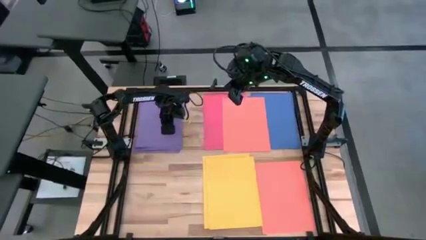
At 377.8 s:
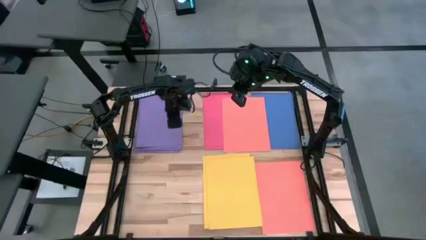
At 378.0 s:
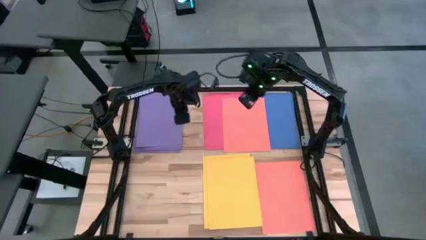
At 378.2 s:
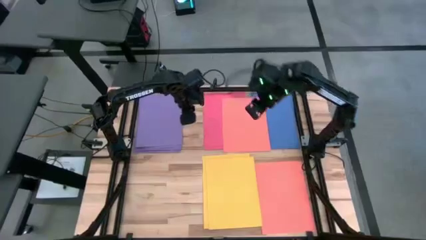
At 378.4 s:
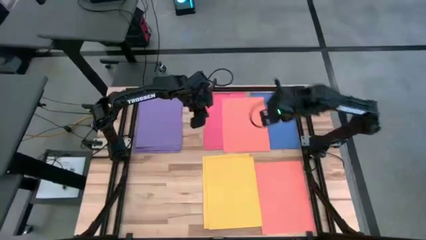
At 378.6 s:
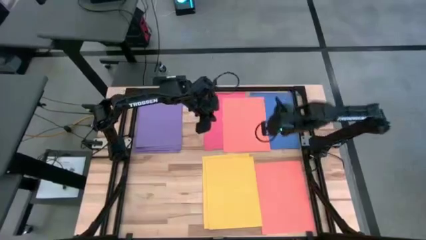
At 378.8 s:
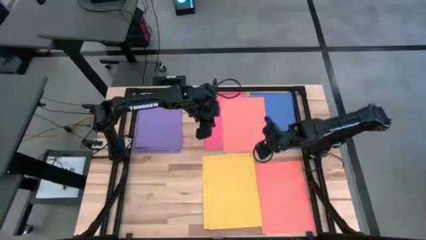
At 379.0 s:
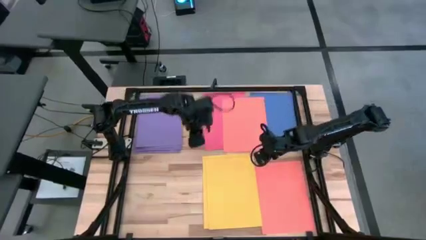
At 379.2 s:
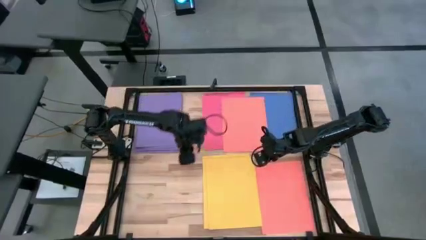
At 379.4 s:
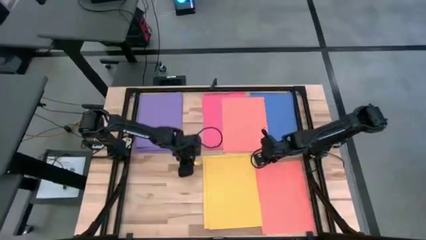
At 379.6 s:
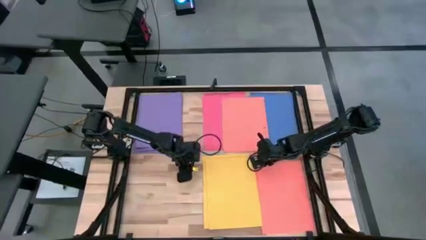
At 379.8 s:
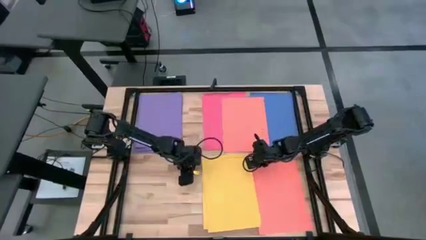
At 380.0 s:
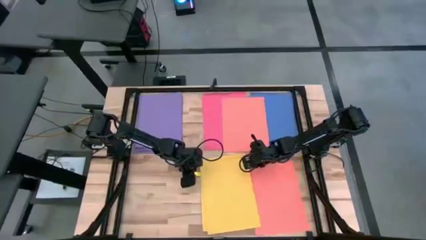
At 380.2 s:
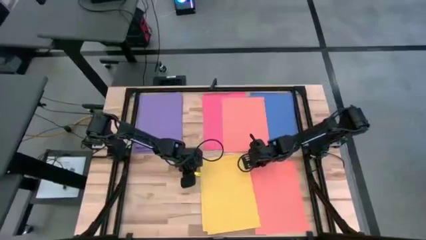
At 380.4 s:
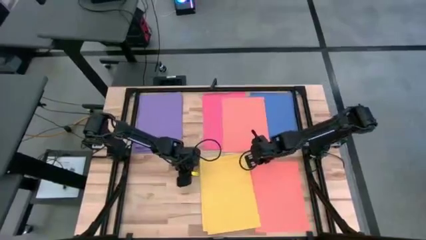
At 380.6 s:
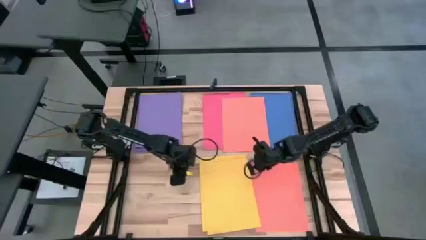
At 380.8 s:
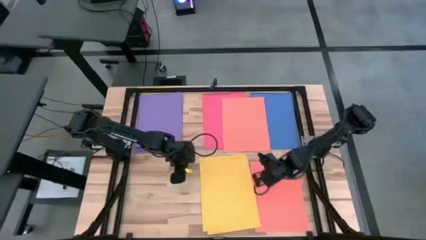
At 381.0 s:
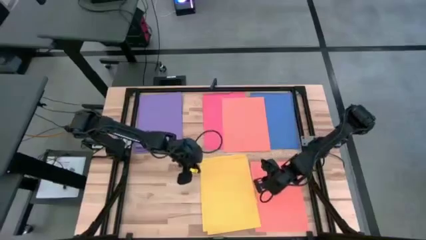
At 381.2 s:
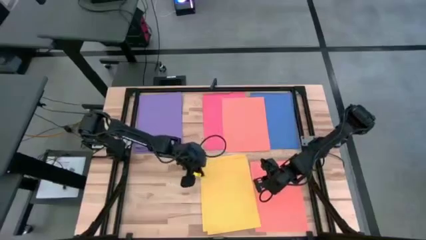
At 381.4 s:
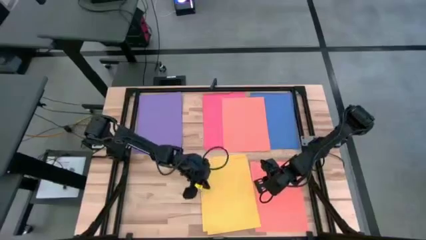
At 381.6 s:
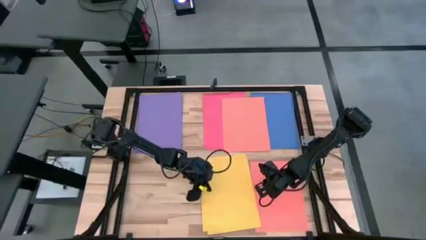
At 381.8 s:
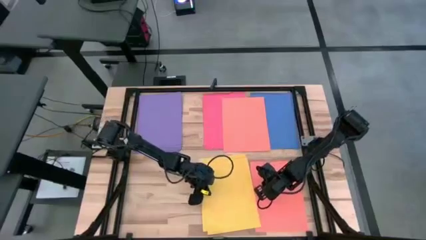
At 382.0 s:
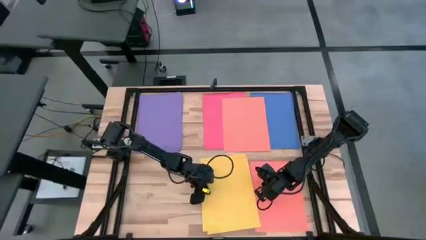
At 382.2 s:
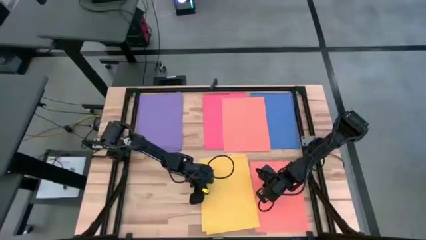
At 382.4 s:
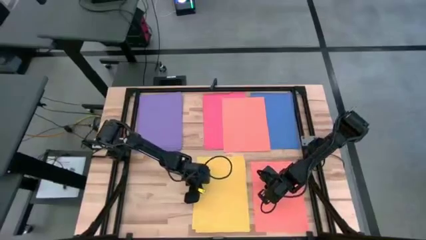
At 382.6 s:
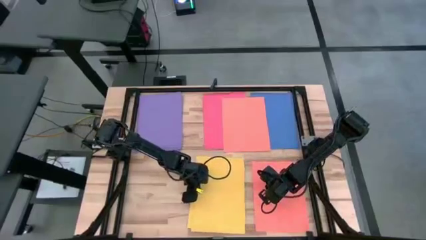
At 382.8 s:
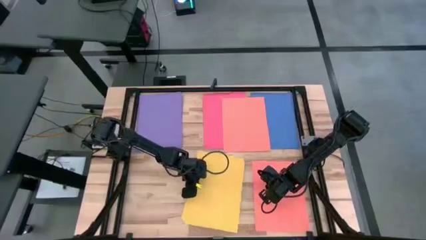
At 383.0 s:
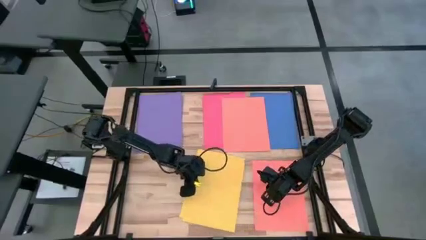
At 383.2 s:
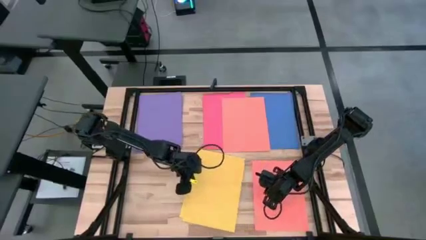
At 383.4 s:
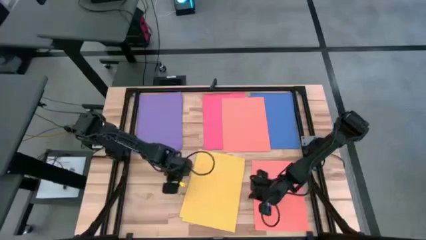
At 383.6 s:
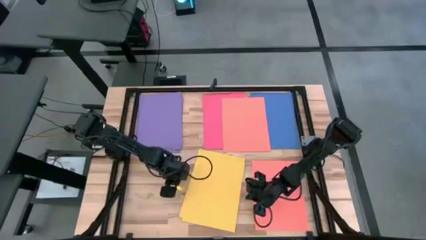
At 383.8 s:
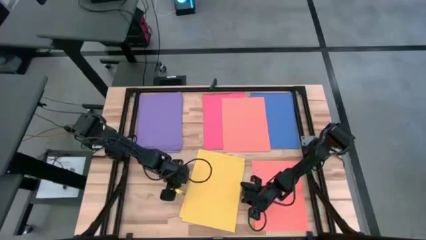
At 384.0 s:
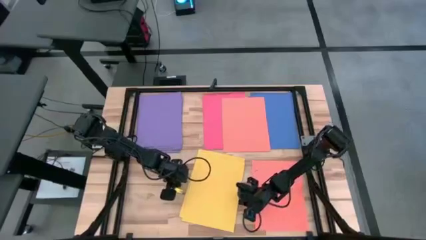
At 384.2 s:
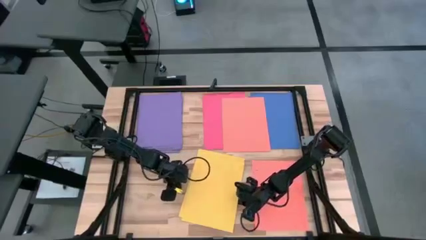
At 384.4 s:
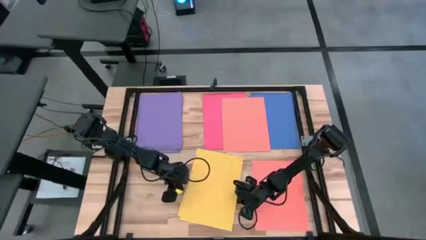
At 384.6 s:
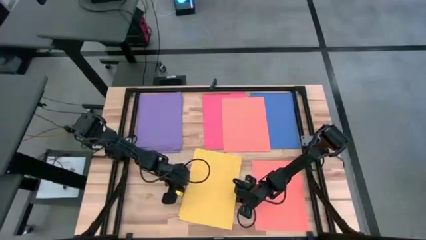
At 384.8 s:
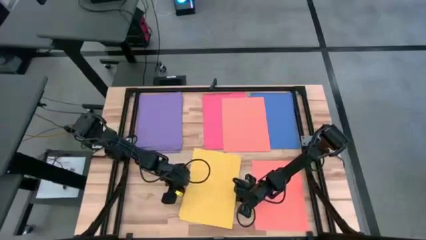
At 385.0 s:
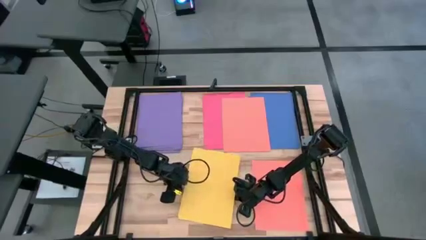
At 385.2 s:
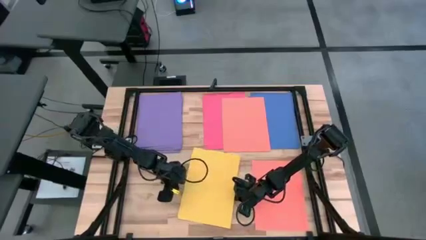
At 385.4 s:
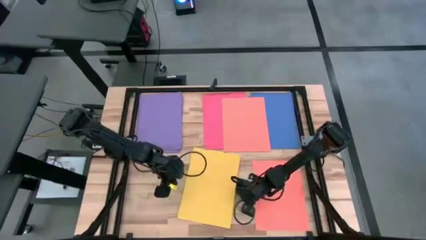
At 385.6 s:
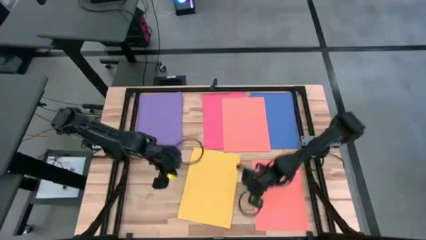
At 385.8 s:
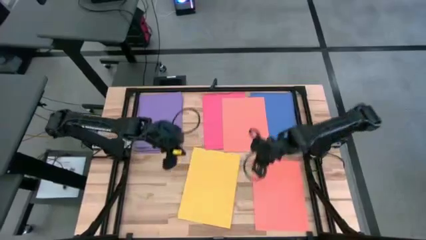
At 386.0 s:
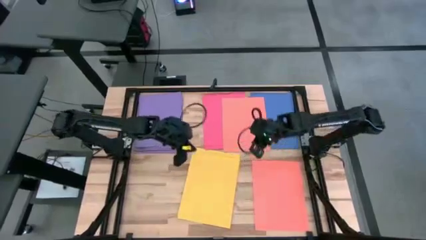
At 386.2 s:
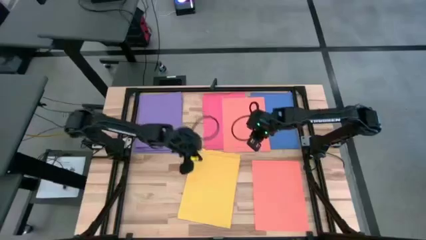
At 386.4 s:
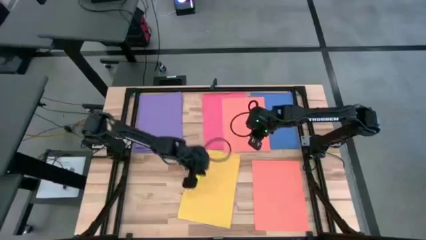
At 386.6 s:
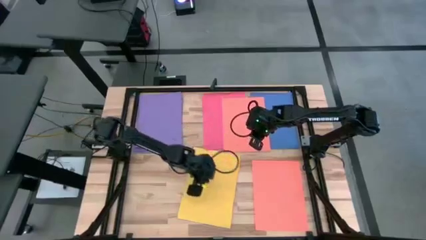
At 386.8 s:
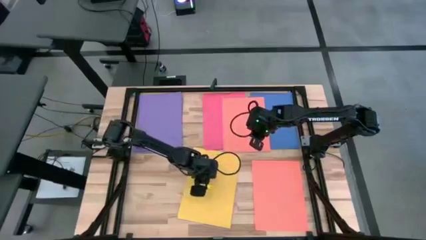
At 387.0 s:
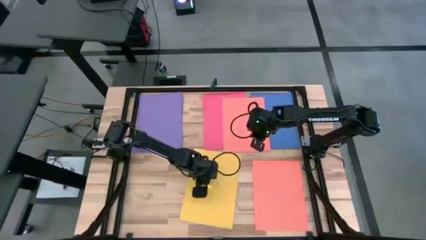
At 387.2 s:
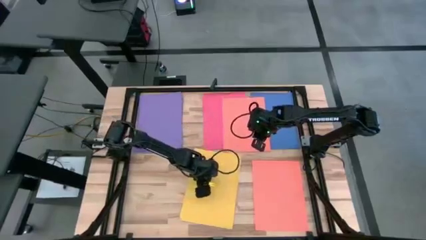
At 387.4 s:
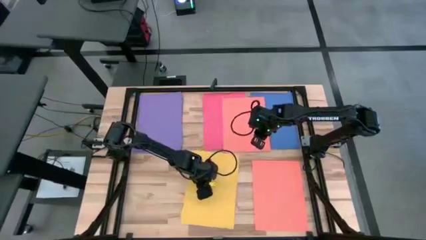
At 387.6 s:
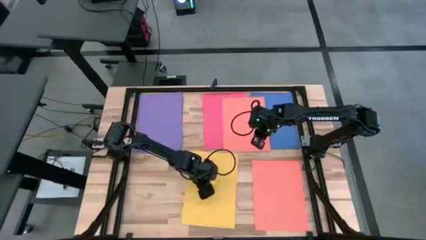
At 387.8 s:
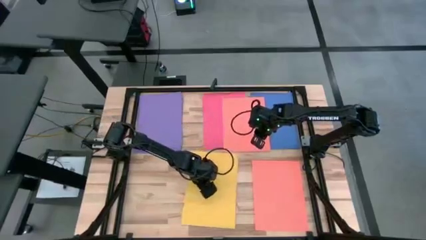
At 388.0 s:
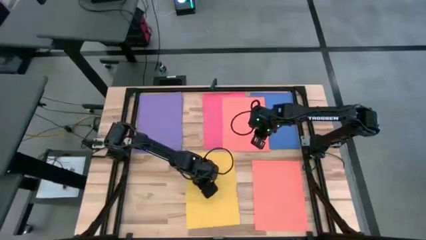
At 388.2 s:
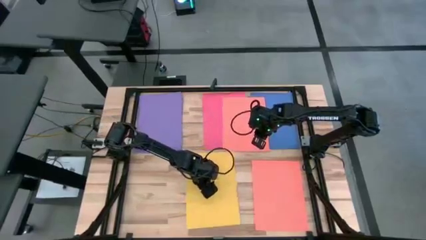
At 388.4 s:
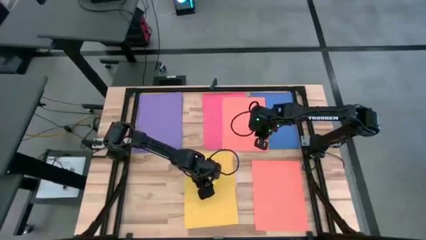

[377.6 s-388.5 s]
Task: Organize paper
Adjust the stacked papers

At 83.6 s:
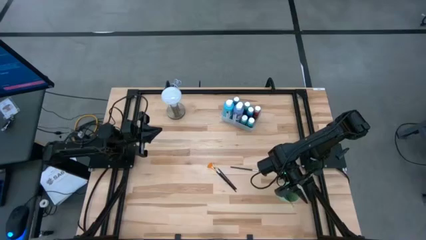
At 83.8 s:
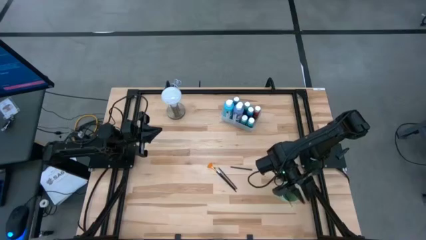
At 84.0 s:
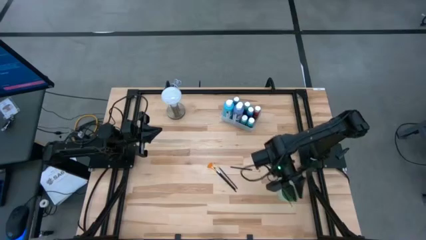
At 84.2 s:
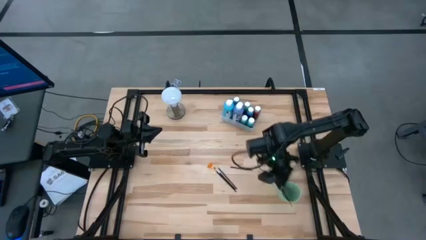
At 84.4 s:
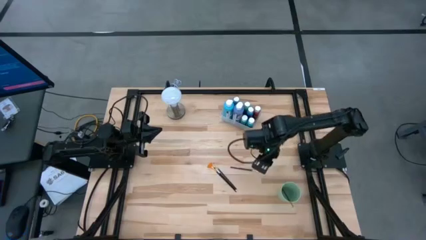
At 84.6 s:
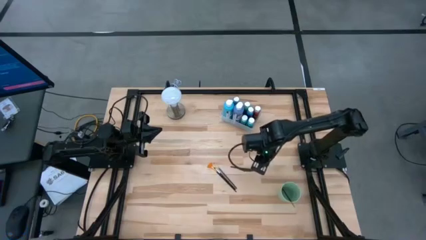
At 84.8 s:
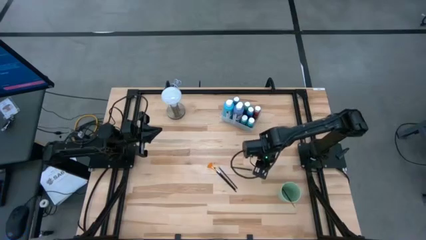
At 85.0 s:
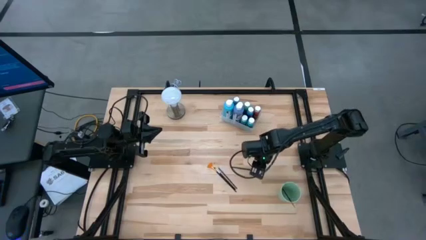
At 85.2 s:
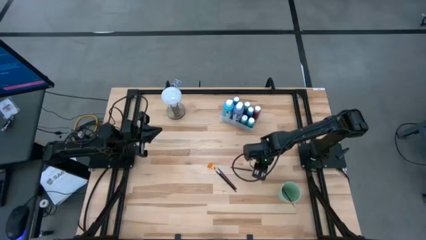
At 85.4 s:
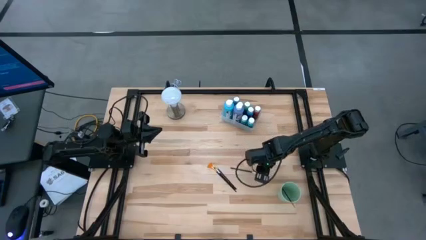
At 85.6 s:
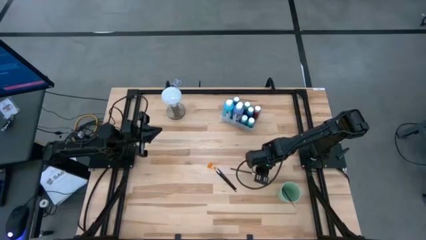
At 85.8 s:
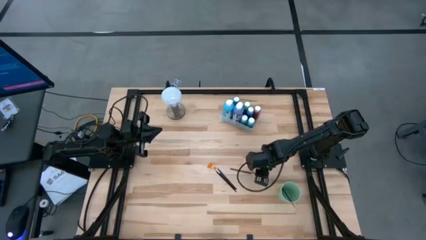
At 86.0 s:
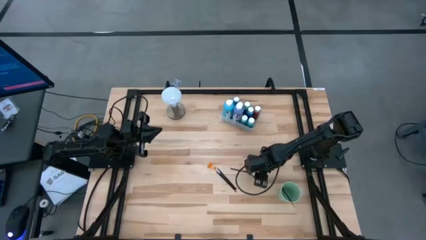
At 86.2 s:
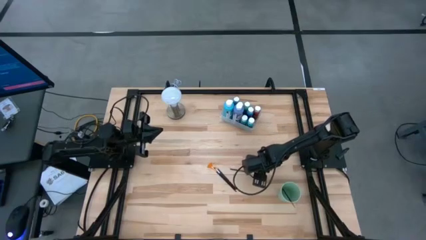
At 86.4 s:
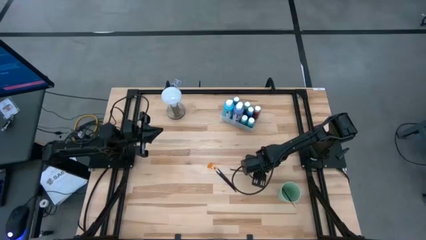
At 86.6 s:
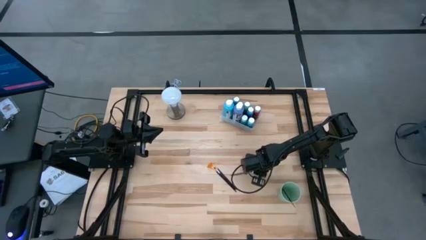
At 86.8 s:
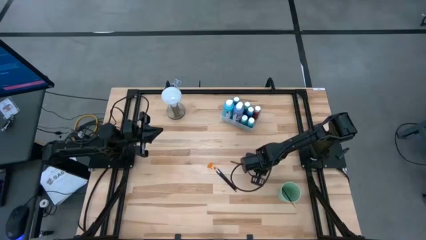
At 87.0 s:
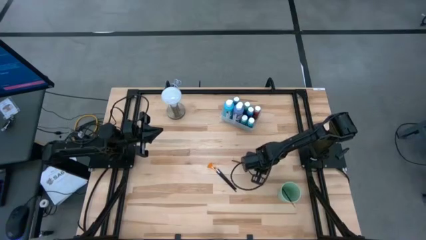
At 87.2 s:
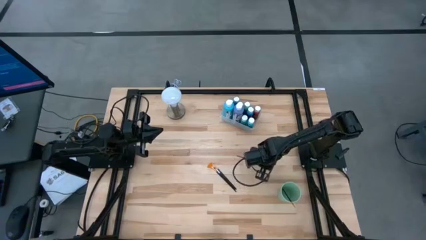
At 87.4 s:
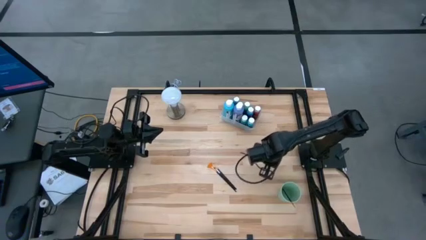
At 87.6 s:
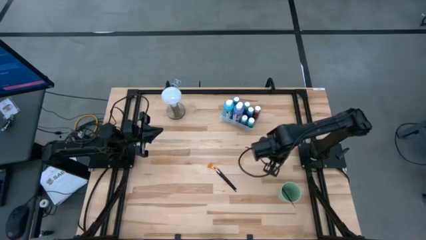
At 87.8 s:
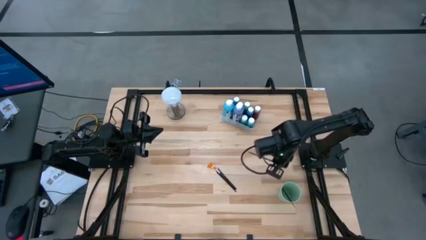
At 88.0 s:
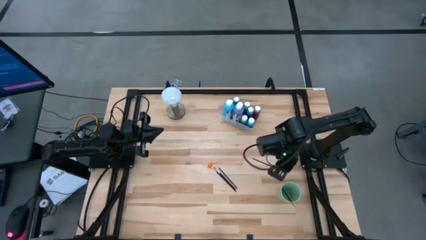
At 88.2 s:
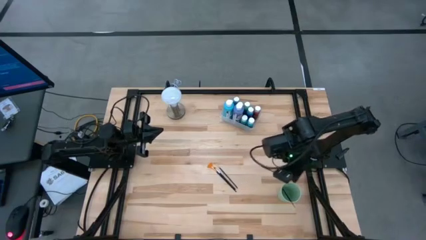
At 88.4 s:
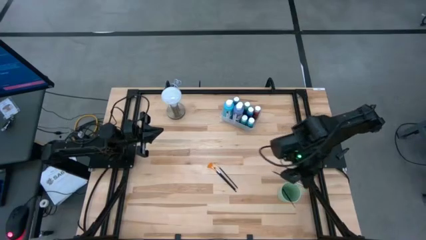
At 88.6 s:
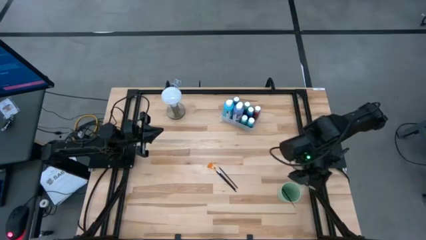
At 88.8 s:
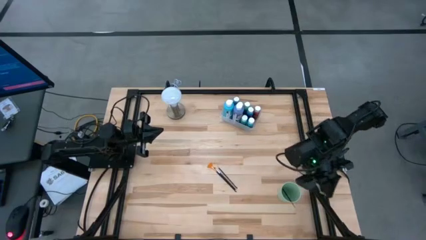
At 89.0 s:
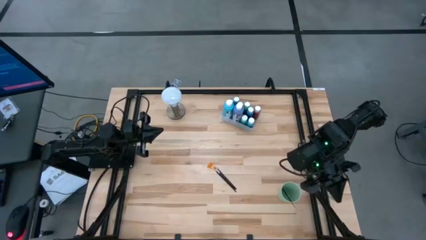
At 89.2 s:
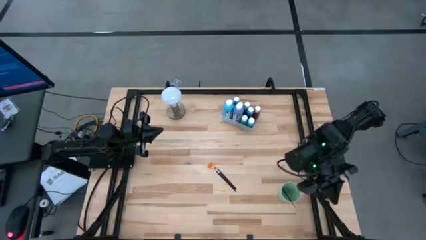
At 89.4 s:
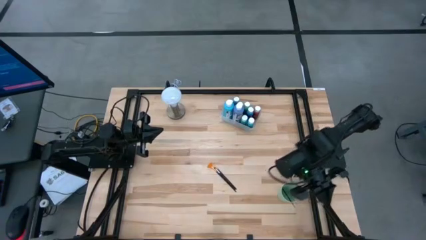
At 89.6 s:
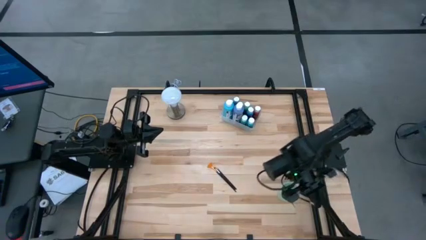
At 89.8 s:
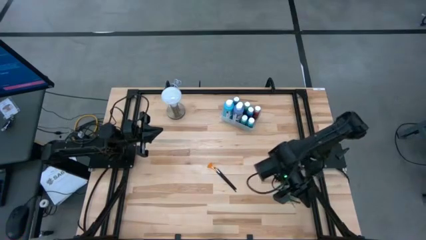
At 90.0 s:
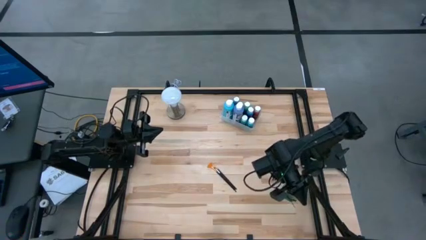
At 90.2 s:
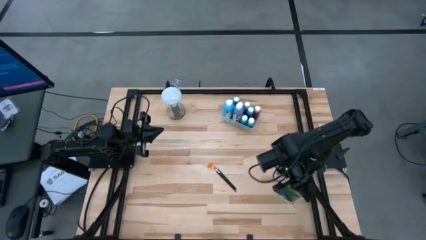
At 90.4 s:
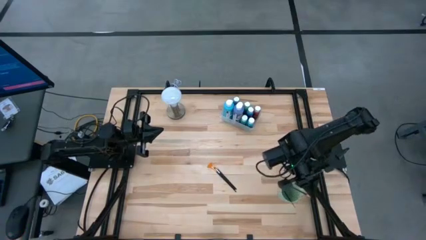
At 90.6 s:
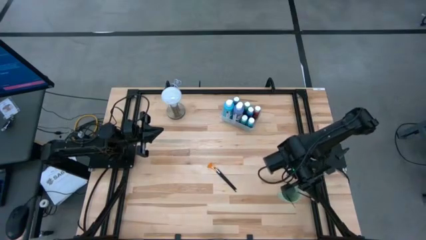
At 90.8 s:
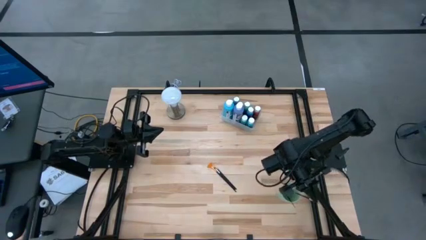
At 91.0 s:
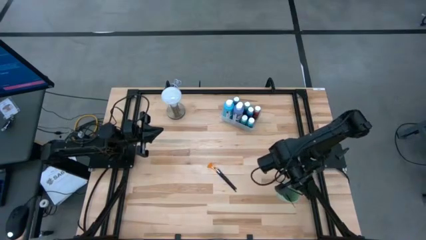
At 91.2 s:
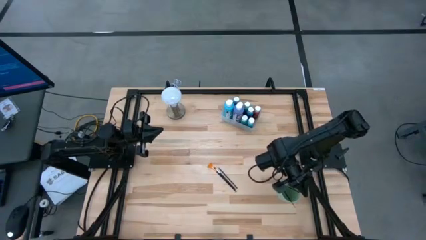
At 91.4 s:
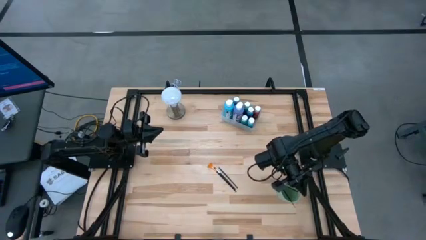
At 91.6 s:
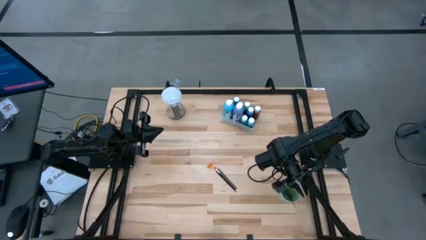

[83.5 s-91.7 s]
Task: Pick & Place Paint Supplies
Put the right eyeshadow brush into the green cup
